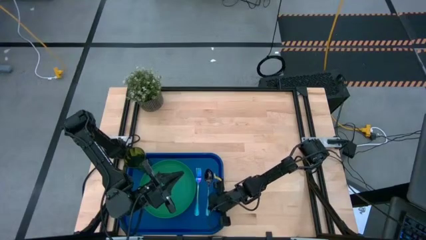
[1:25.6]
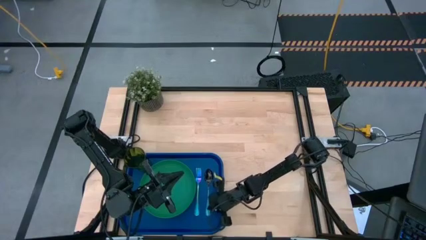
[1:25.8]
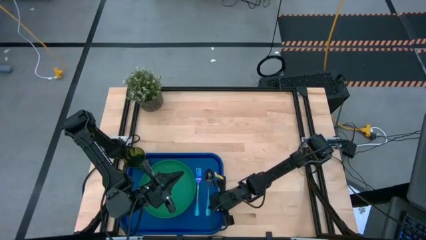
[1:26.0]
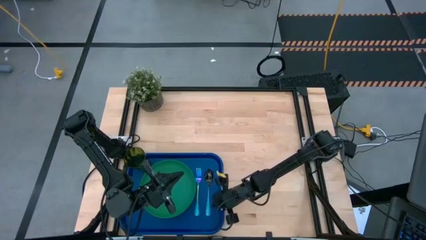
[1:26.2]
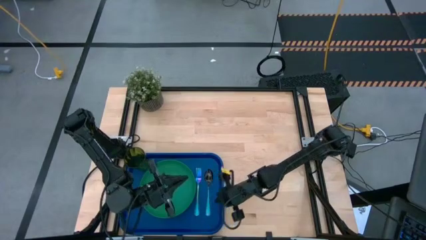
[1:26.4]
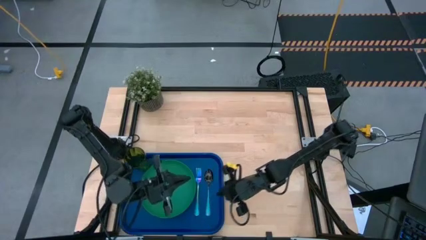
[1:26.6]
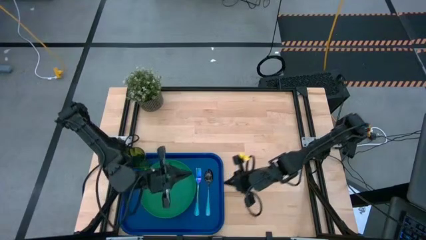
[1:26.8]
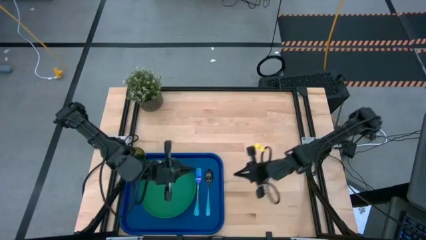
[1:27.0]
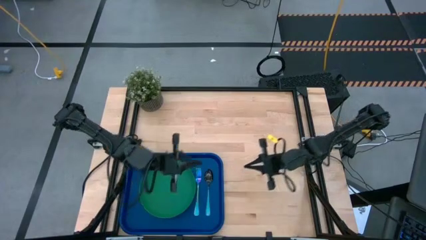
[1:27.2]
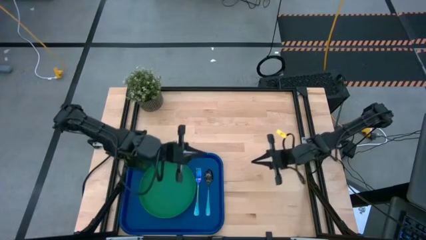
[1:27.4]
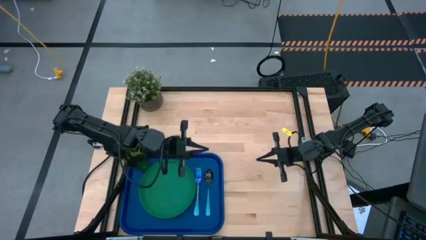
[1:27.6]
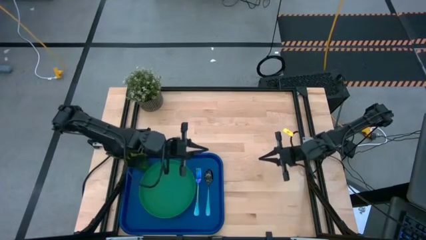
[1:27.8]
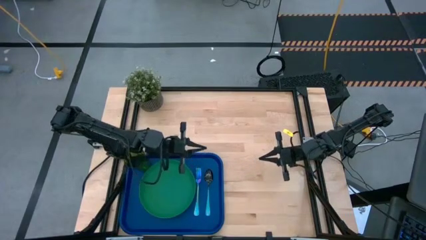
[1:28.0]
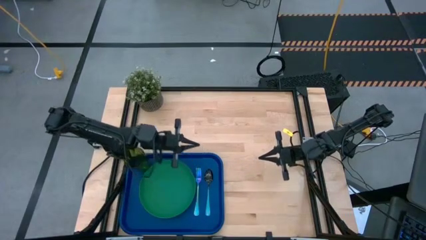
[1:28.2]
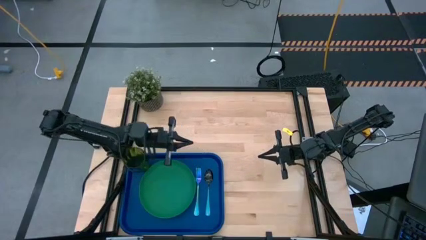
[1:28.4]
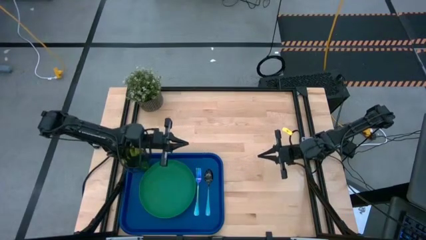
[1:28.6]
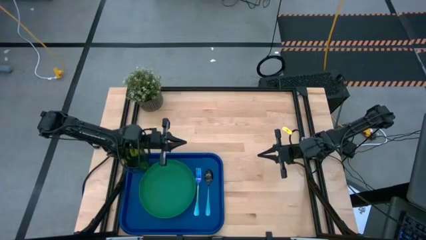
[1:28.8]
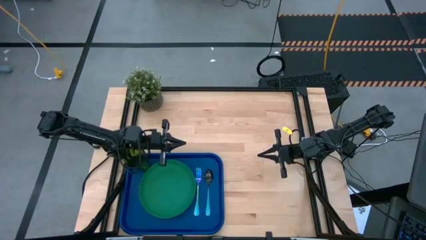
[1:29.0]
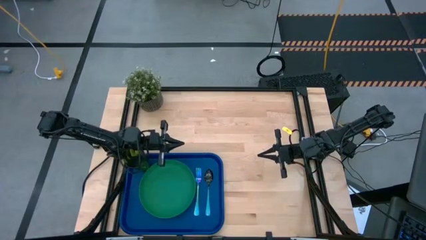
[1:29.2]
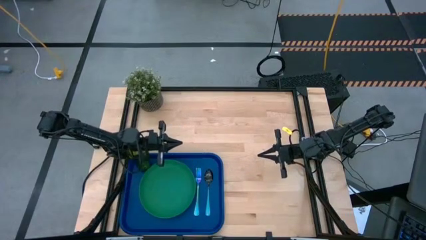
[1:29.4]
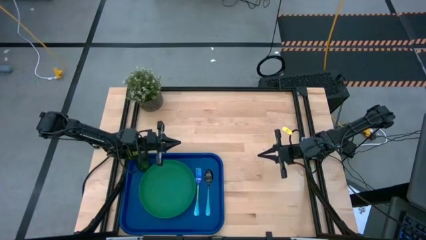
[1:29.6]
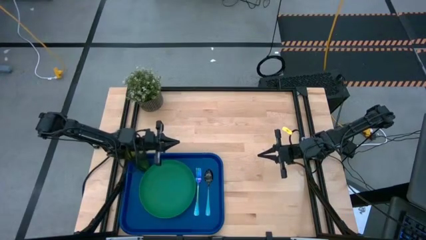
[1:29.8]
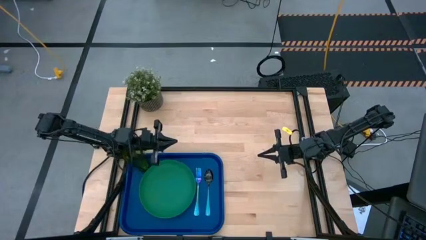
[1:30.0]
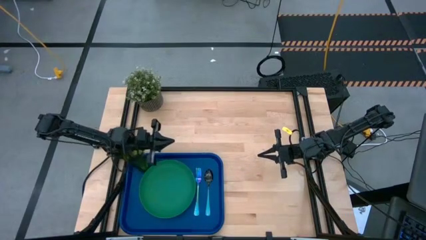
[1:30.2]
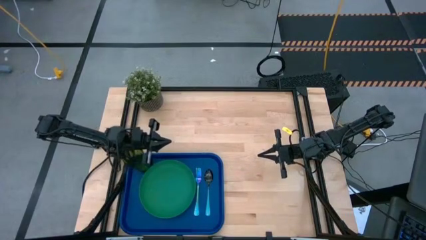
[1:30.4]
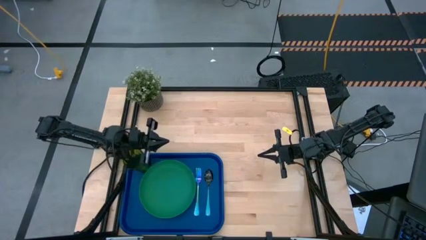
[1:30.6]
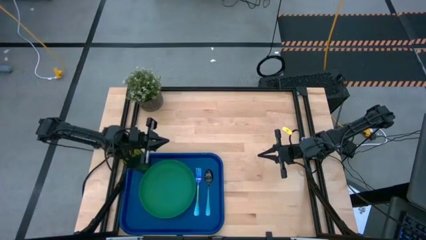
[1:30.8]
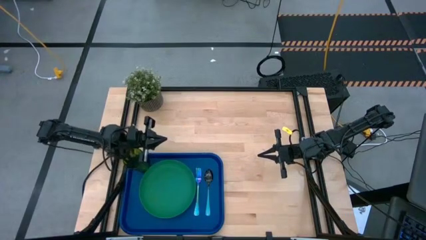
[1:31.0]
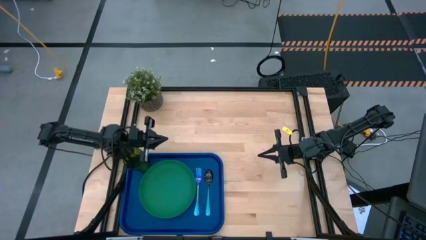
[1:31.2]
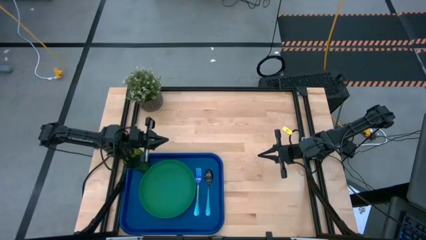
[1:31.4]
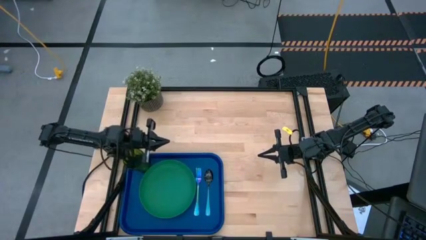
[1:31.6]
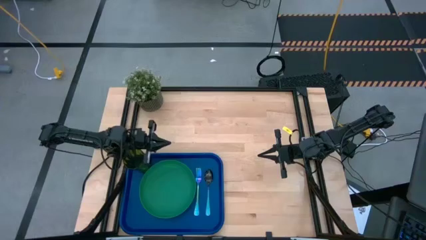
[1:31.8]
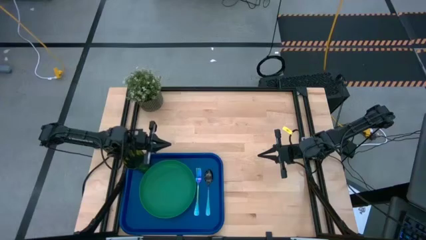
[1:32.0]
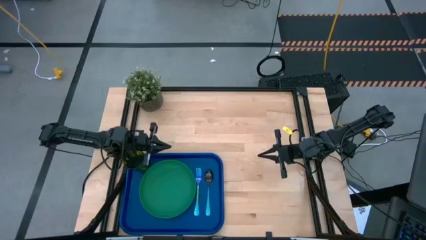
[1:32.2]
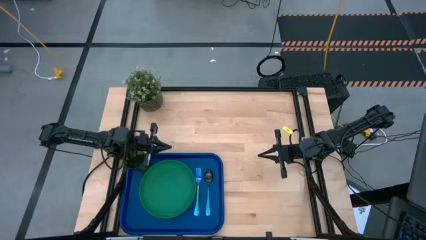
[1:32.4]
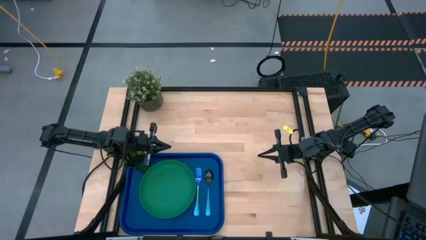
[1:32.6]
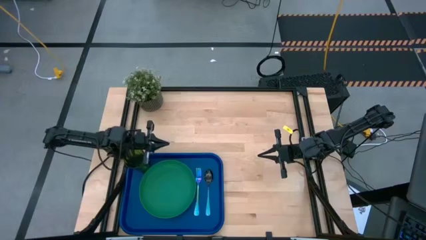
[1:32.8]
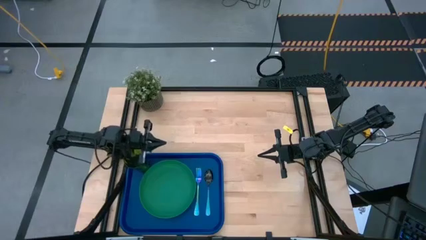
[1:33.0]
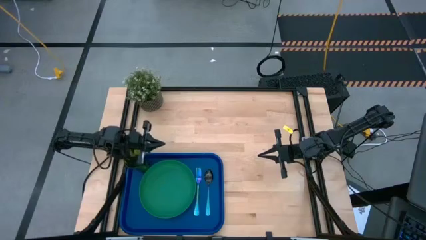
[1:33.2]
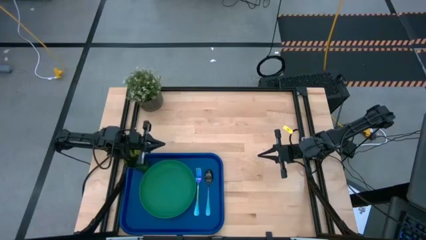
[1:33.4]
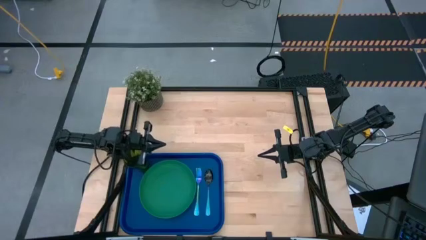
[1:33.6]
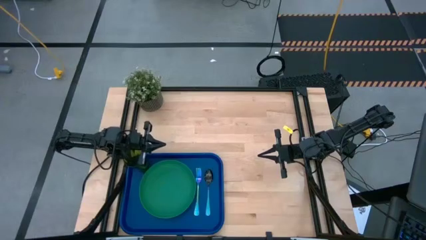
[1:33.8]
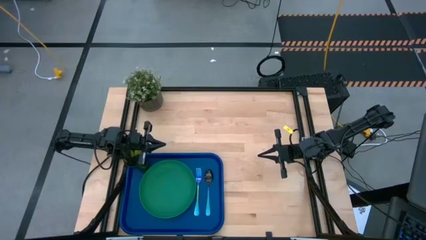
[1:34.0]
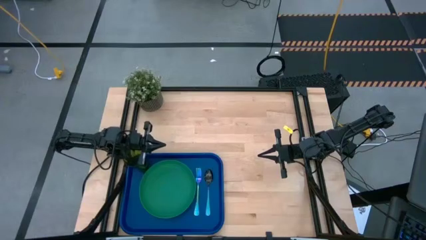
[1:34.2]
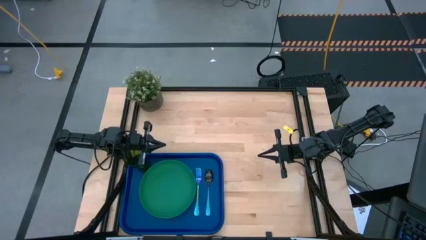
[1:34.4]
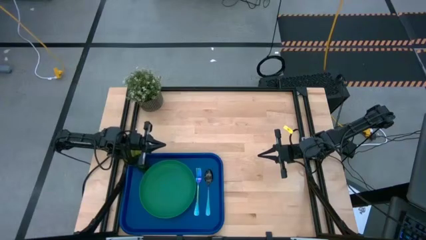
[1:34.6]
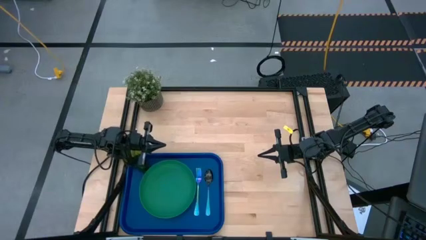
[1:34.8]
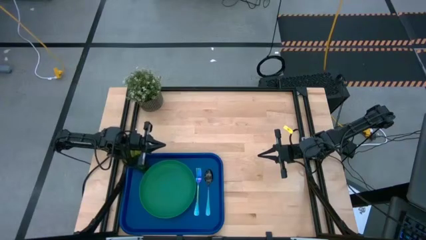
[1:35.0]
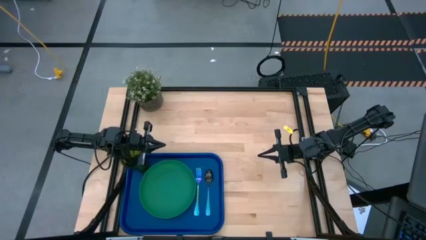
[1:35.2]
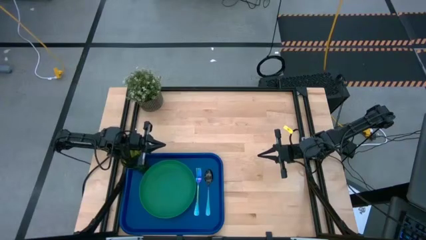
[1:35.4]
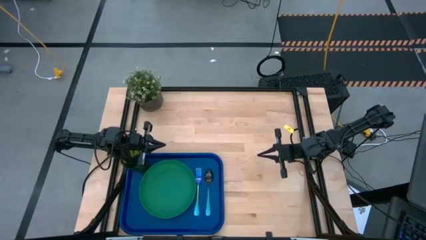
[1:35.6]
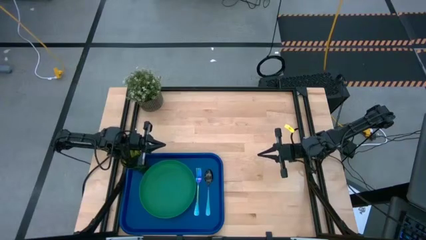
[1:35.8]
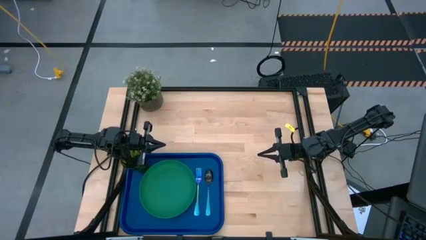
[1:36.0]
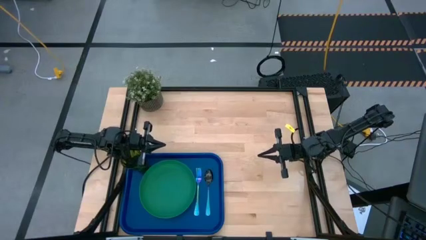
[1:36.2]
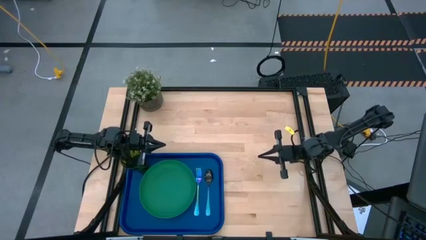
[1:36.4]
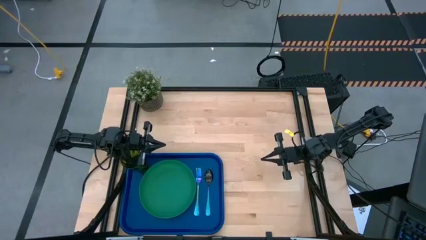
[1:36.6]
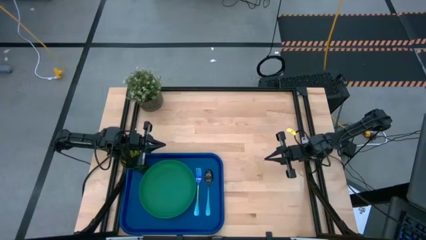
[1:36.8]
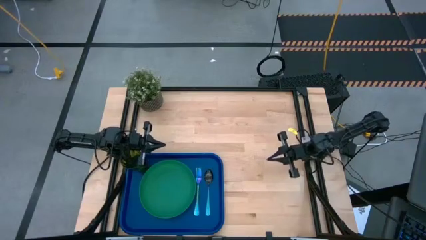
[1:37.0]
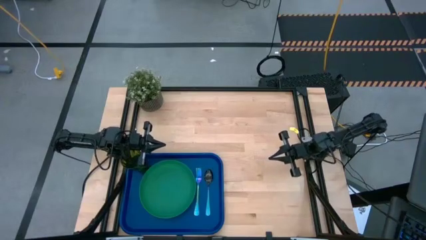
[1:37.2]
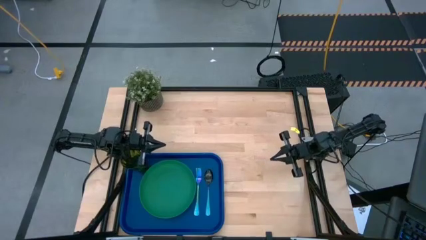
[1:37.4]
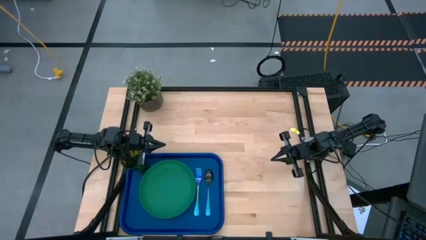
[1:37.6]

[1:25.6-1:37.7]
Task: Pick and place plate/cup/fork/spoon on tray
Return to Home Position

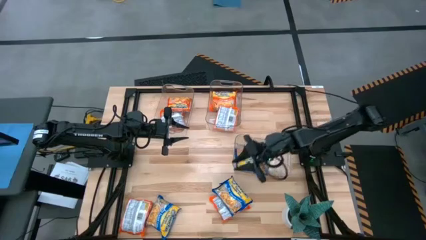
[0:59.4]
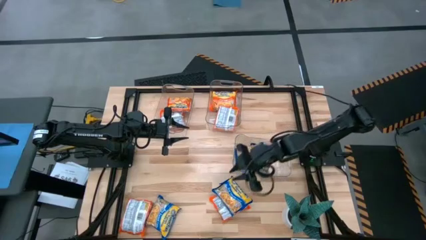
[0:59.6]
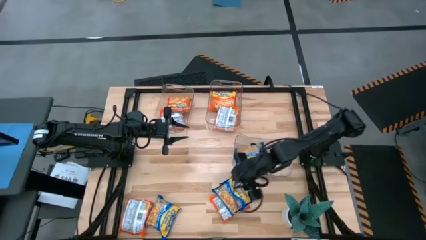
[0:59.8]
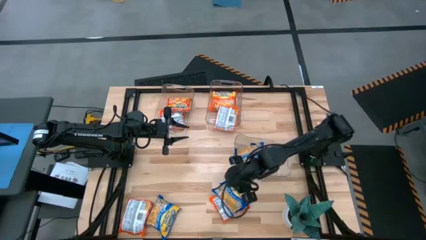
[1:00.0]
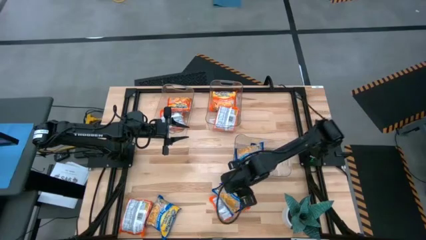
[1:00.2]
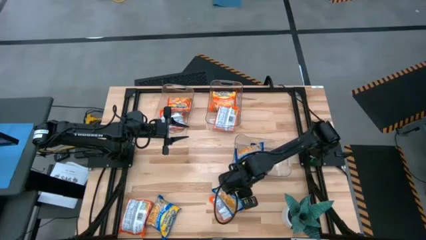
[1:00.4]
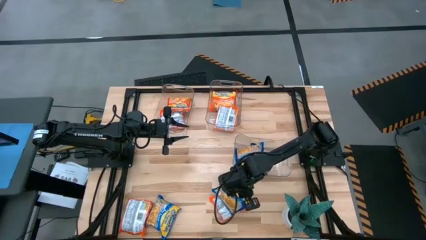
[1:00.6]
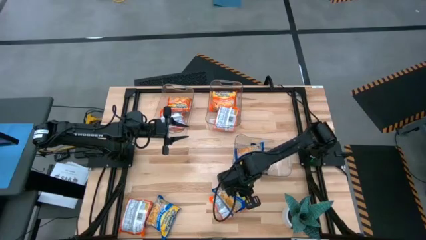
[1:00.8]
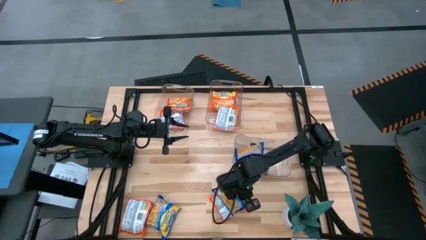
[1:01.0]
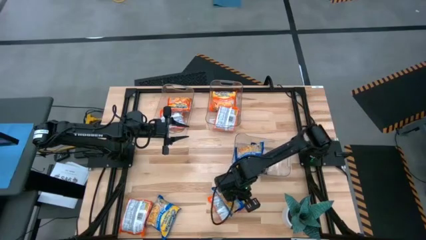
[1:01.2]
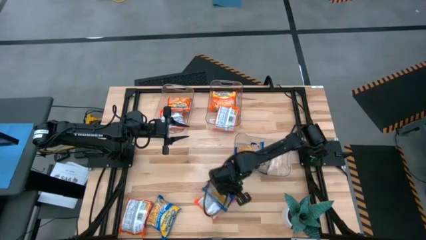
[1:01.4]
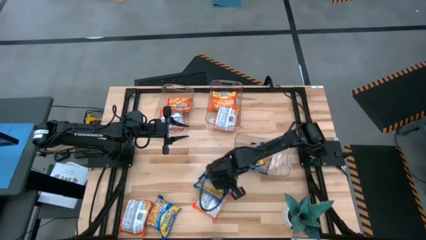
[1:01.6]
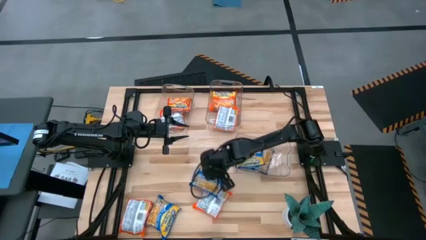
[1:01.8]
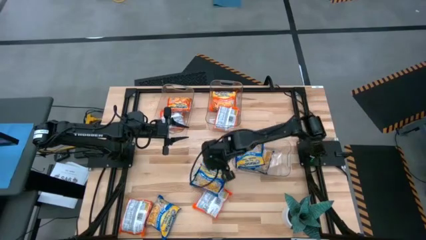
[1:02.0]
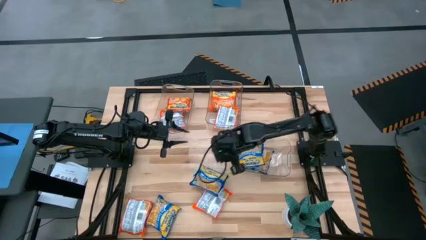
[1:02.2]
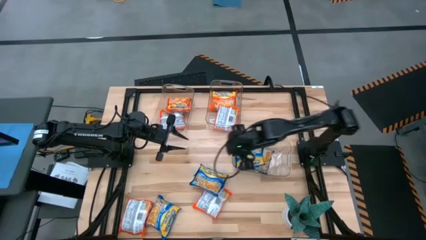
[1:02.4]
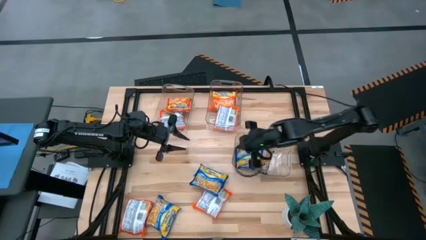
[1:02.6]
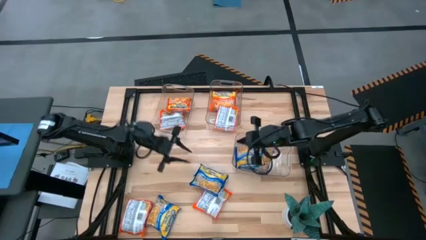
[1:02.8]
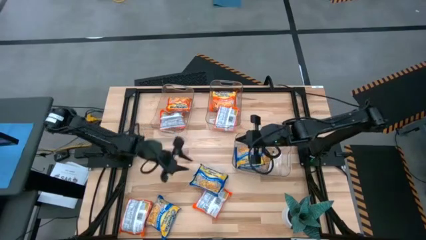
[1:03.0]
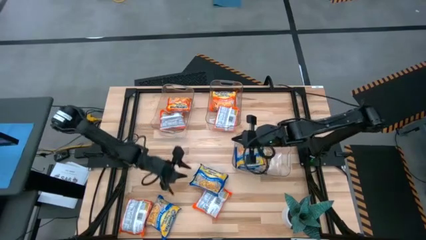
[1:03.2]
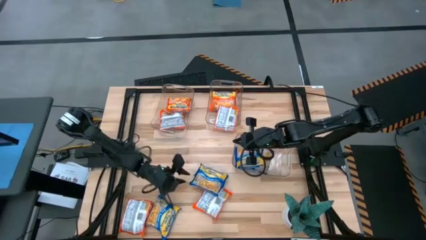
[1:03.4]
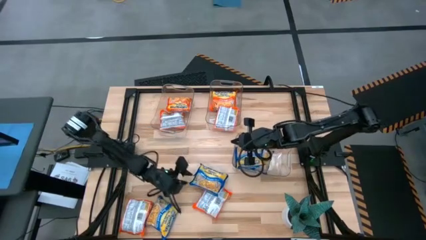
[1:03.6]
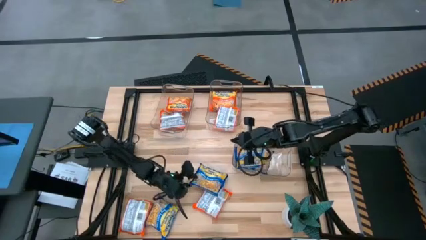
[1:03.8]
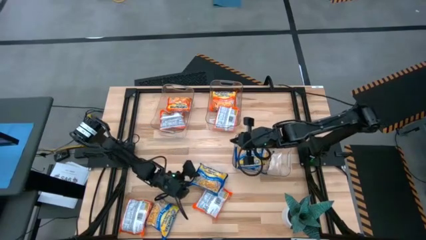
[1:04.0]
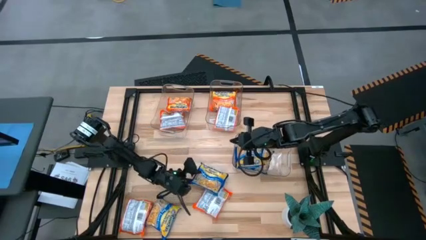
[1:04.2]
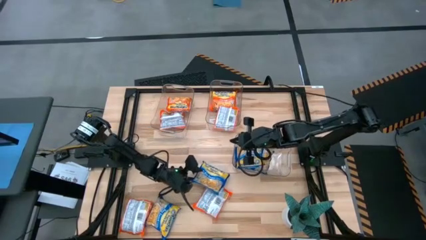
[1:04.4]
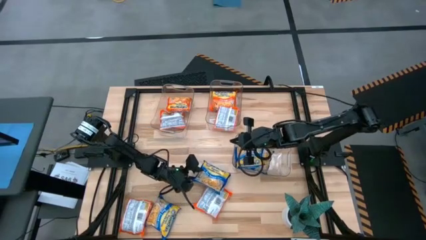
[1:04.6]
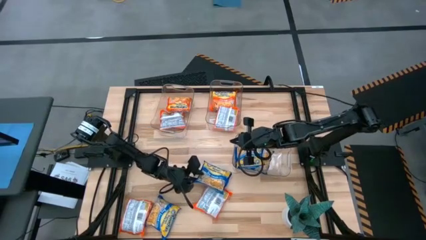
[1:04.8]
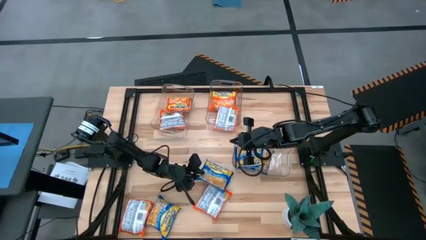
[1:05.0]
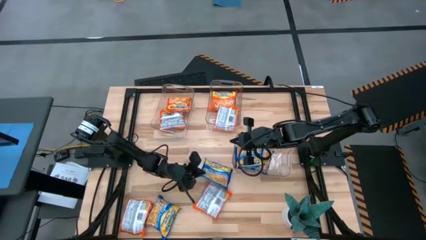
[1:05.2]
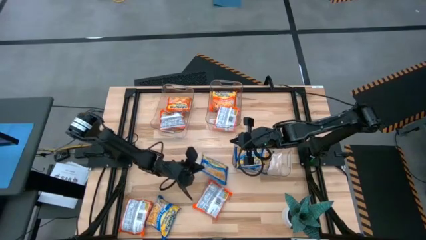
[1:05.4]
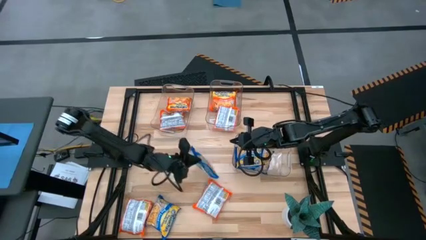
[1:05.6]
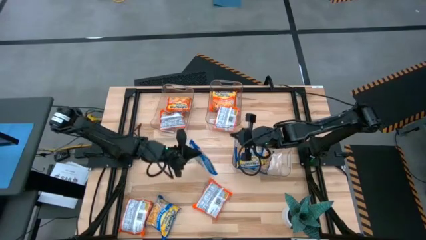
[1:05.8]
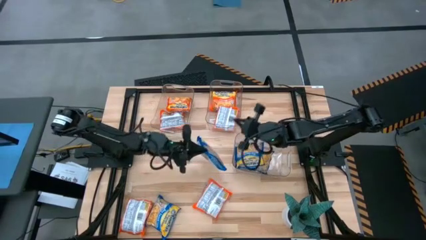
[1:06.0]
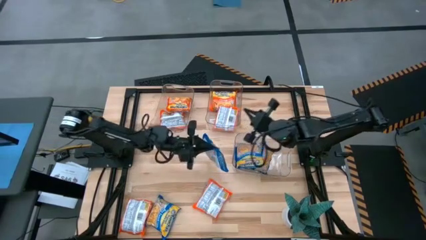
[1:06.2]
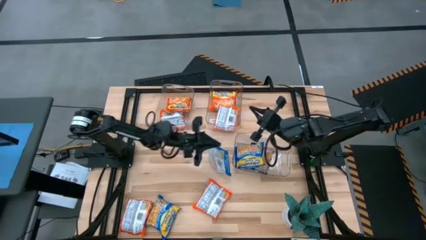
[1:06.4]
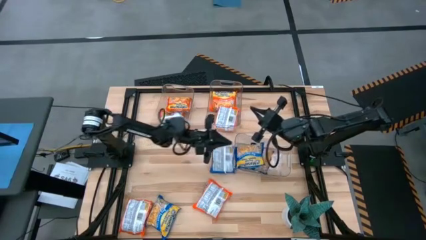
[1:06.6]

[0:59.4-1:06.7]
Task: Sort Maruchan noodles
Put the blue bag into the right transparent bin
